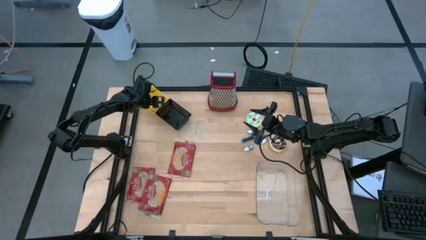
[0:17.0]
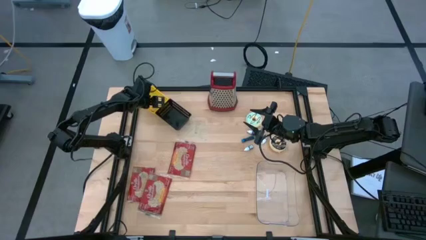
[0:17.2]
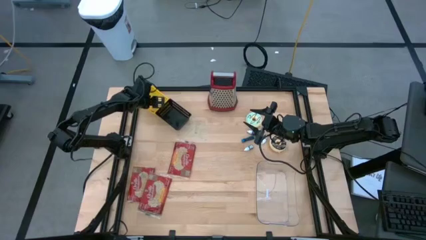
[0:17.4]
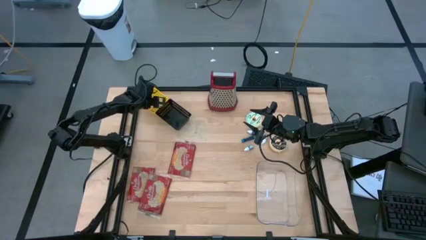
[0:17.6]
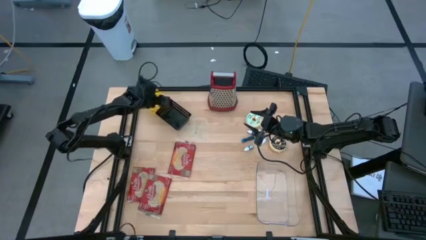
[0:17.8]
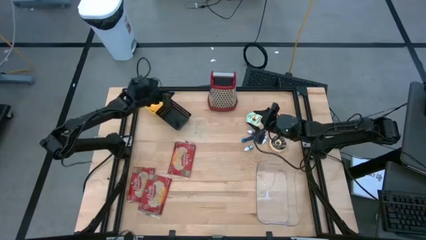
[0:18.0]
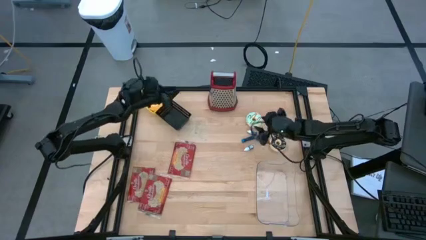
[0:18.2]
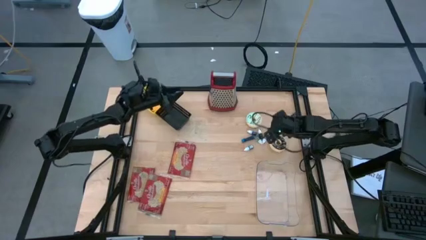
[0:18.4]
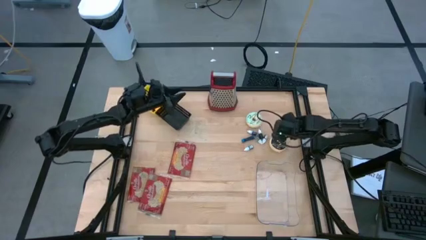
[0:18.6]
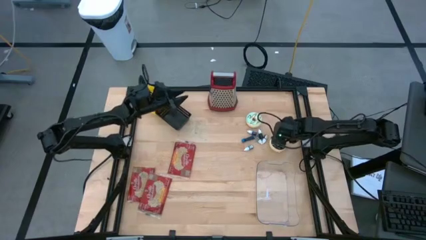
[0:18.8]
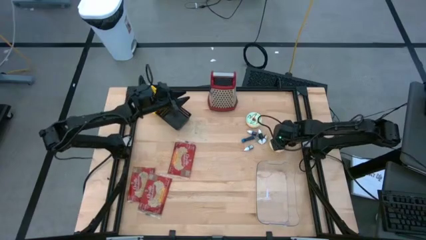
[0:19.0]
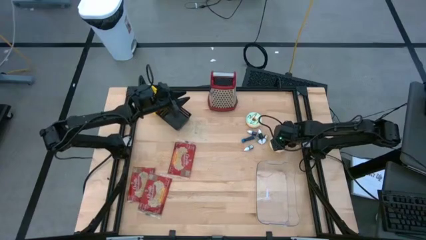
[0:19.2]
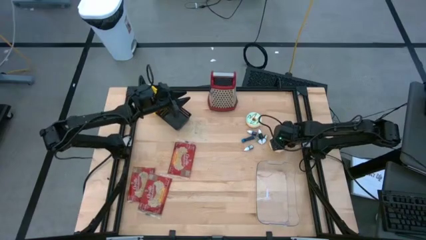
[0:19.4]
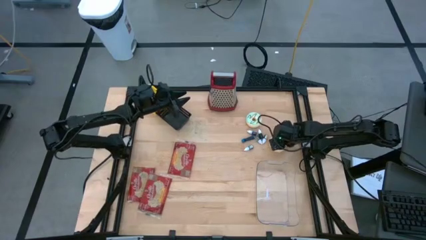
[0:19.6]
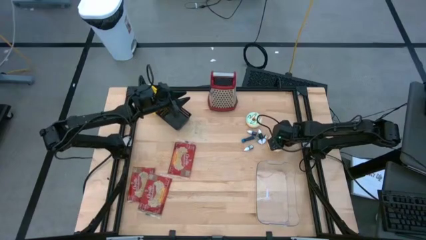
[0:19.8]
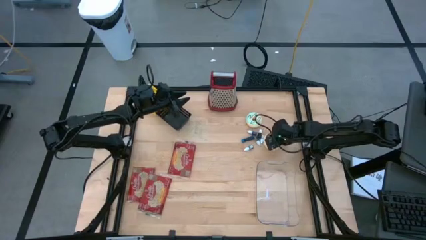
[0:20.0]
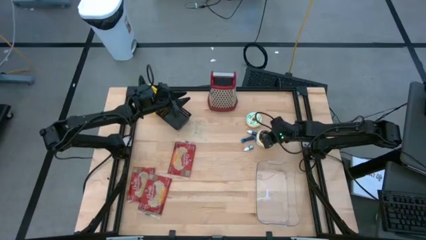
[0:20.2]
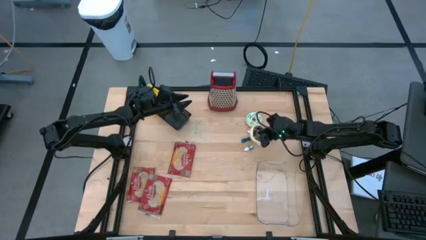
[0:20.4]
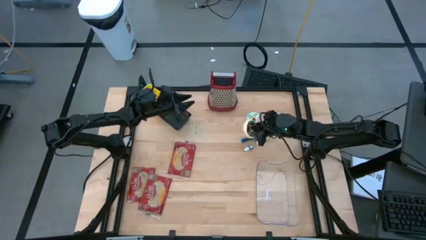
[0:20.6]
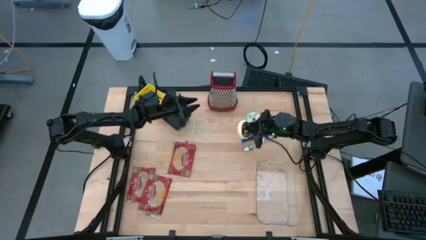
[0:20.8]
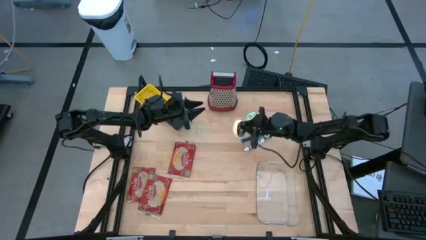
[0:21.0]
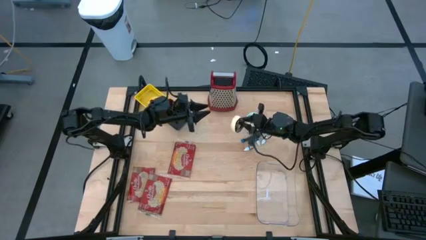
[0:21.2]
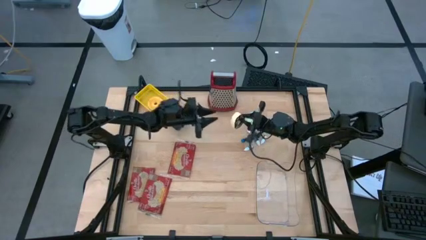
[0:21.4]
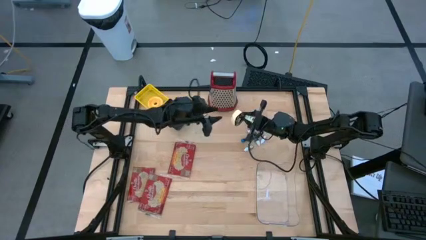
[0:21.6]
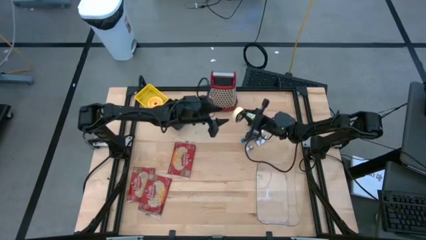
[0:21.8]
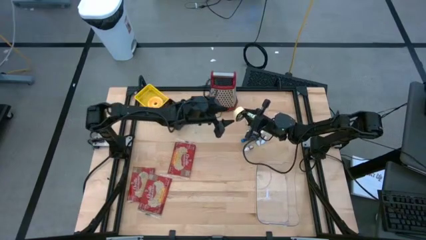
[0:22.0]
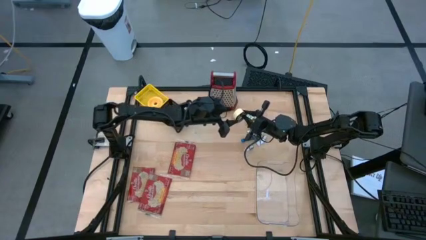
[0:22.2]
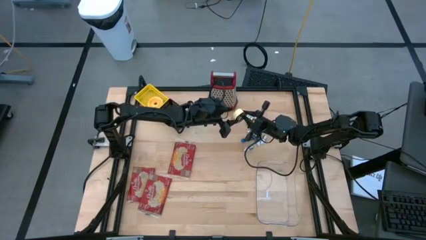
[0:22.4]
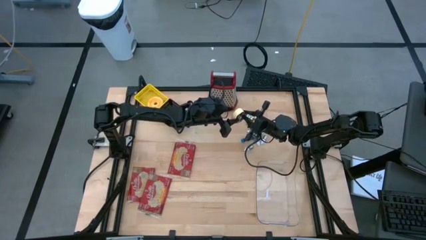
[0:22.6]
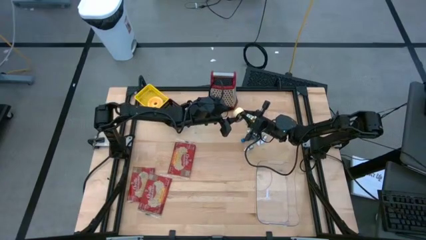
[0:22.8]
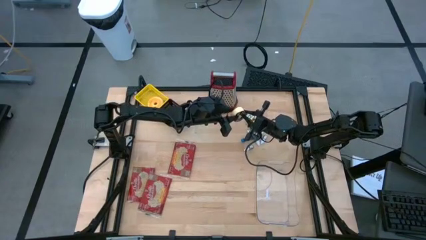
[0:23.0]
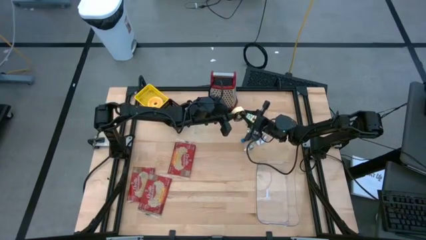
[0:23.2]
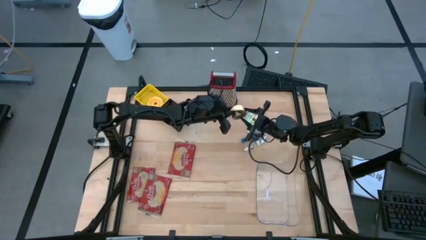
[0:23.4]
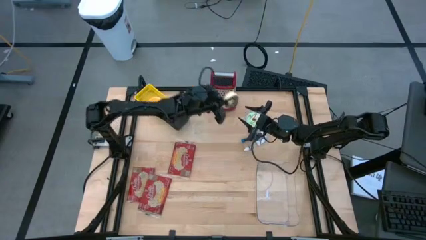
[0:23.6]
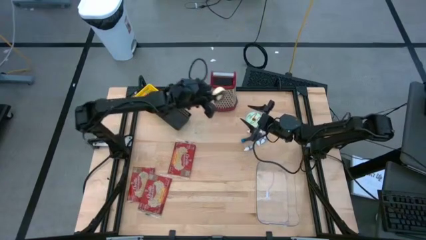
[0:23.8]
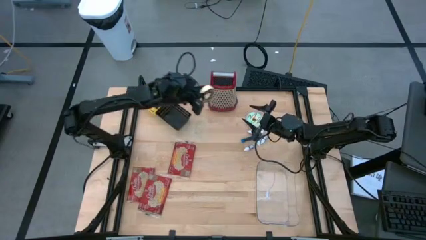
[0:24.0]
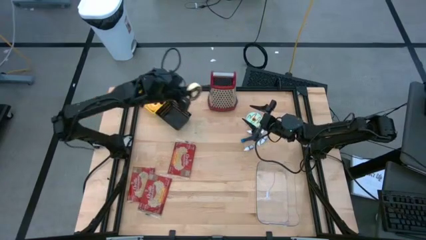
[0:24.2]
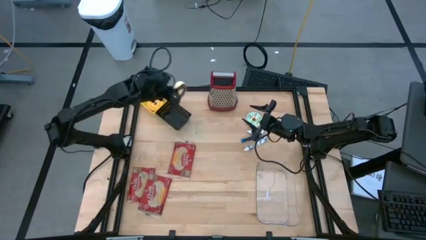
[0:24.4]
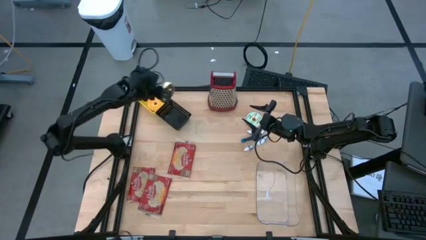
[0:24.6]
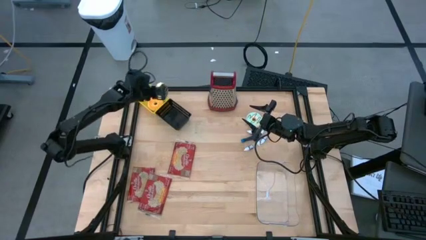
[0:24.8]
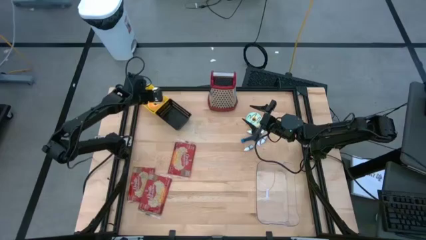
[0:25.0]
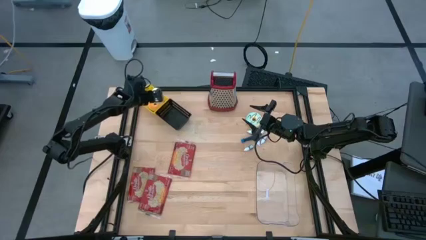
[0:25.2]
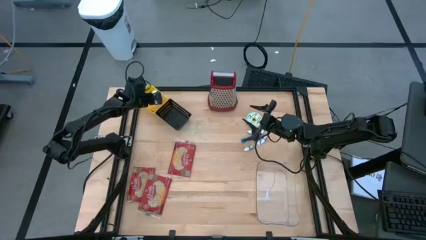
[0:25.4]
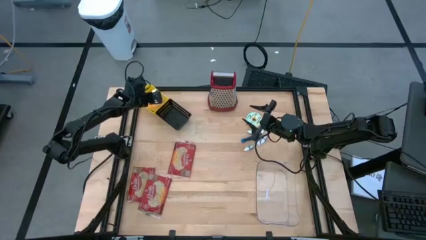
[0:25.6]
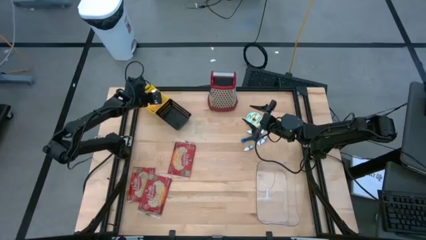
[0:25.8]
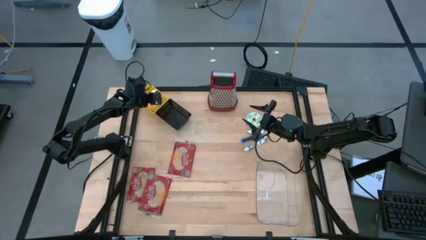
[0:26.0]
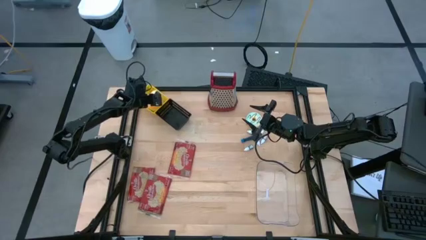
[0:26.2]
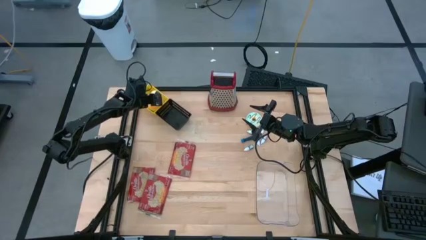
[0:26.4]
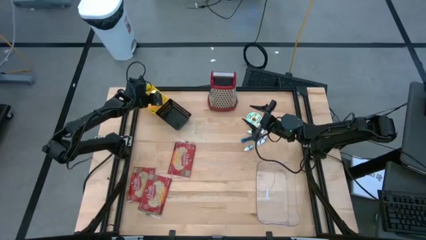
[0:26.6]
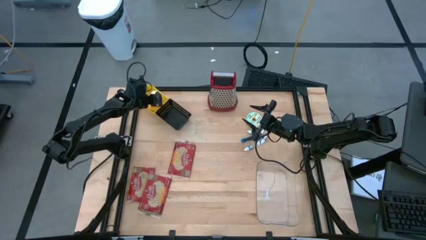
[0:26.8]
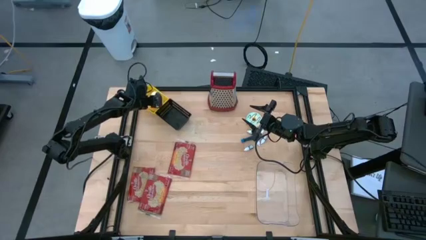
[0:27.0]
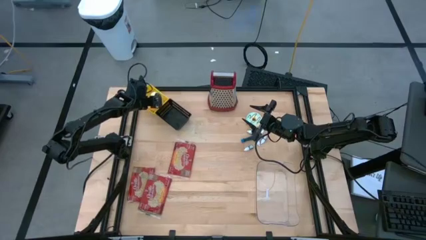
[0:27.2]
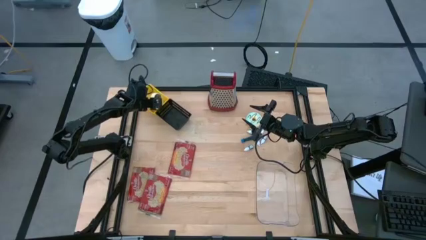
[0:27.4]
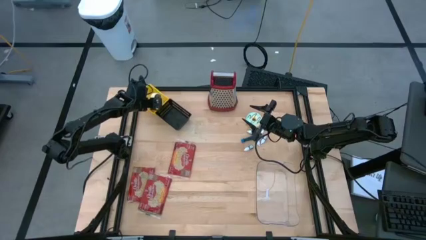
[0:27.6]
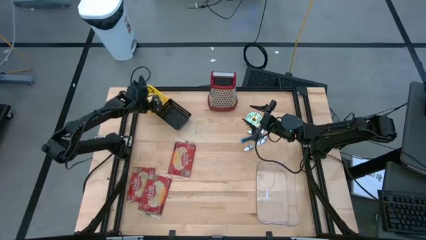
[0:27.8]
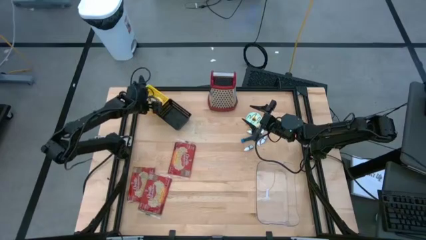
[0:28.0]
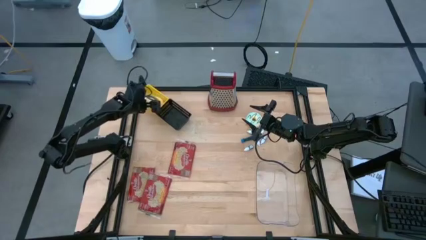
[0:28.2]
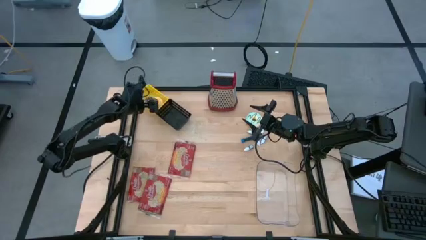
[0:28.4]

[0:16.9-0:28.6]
Put the black donut into the yellow bin
